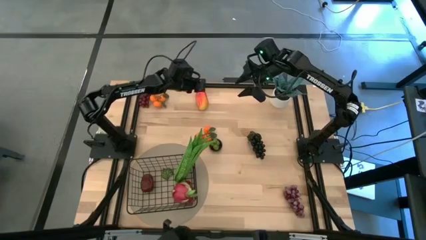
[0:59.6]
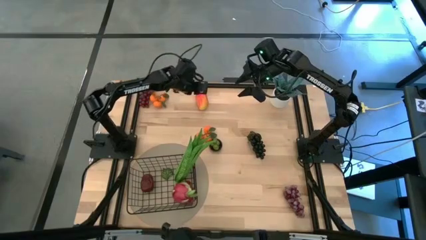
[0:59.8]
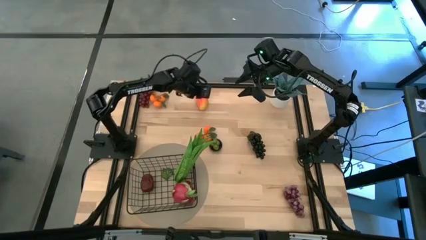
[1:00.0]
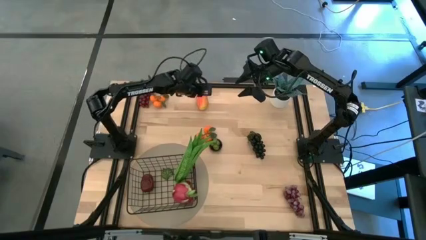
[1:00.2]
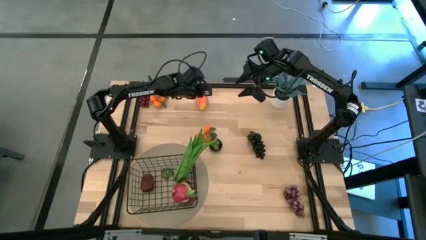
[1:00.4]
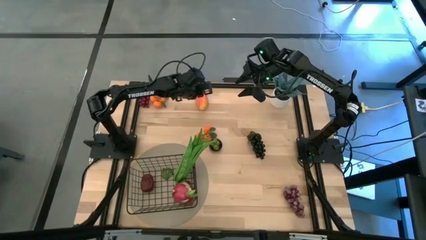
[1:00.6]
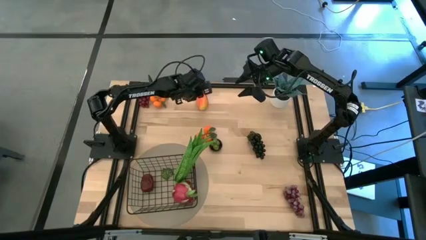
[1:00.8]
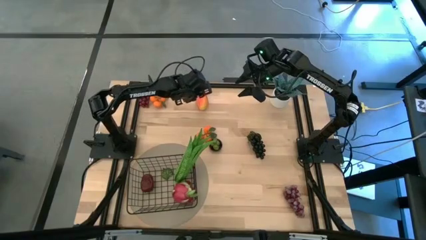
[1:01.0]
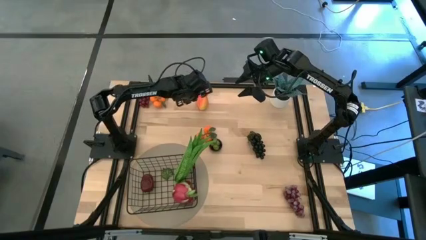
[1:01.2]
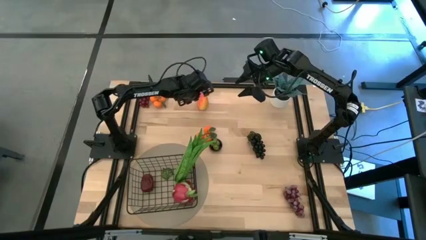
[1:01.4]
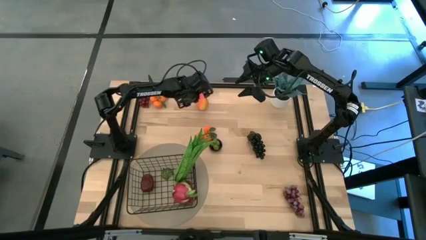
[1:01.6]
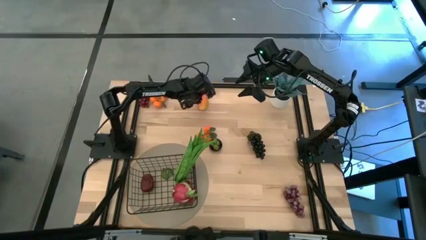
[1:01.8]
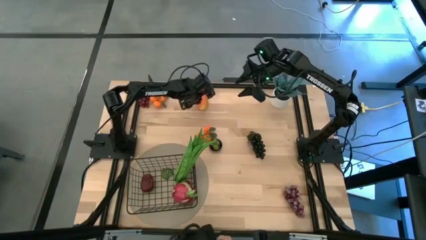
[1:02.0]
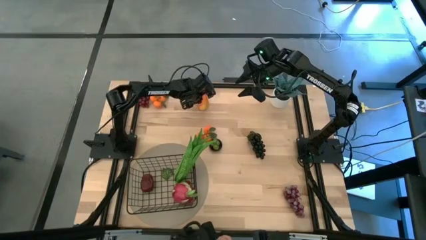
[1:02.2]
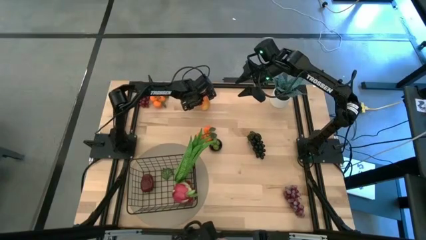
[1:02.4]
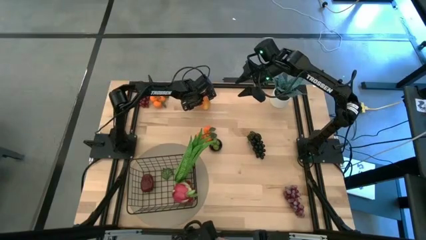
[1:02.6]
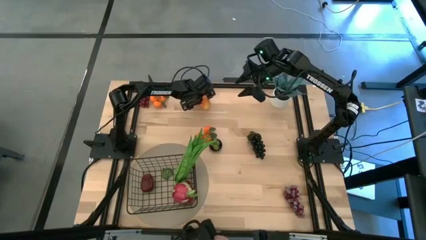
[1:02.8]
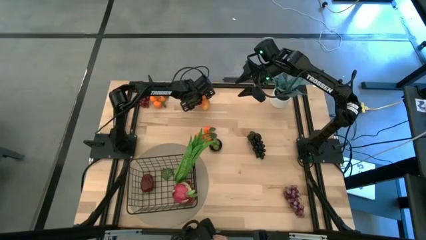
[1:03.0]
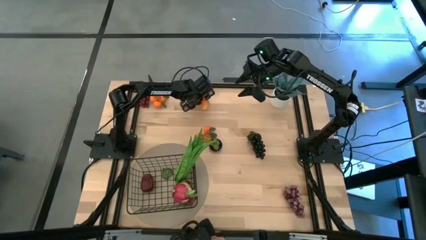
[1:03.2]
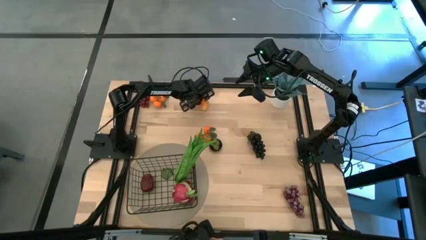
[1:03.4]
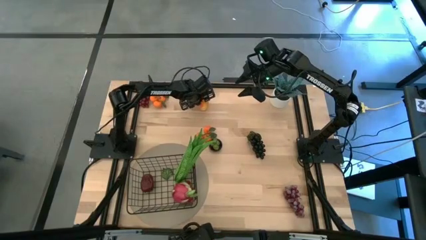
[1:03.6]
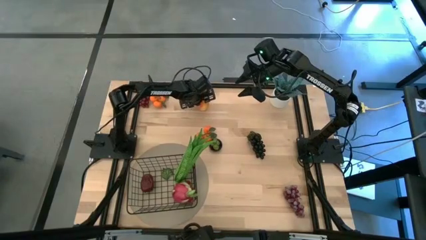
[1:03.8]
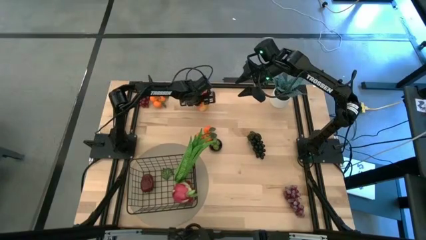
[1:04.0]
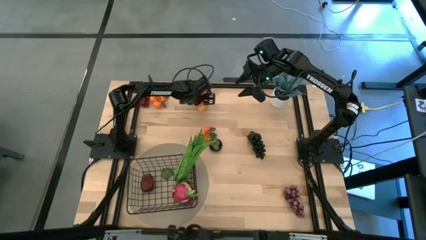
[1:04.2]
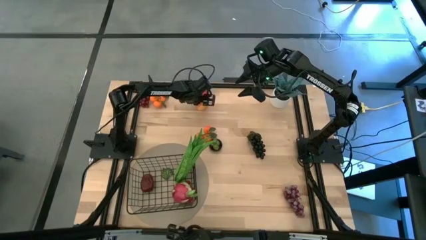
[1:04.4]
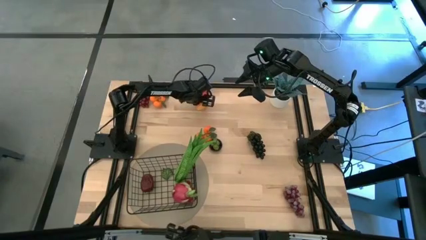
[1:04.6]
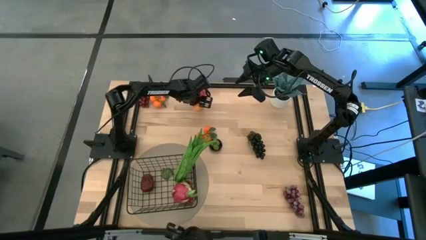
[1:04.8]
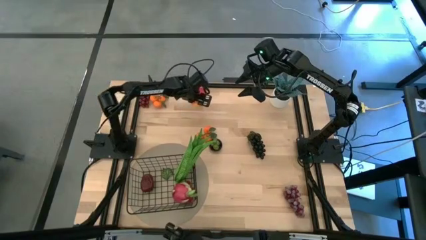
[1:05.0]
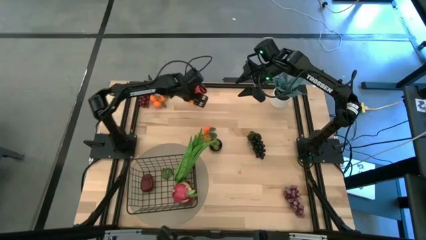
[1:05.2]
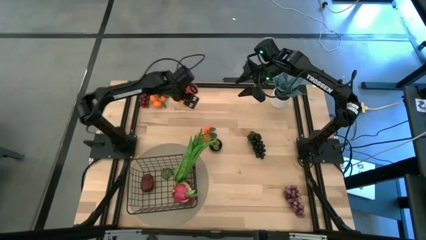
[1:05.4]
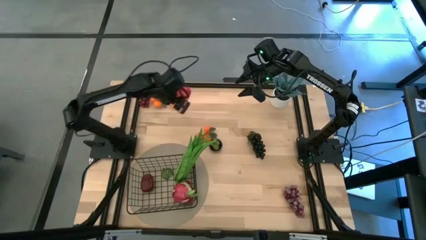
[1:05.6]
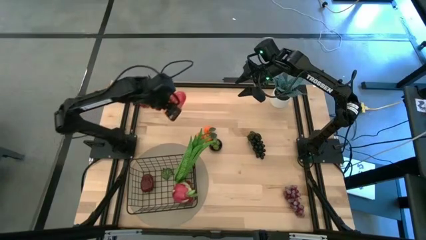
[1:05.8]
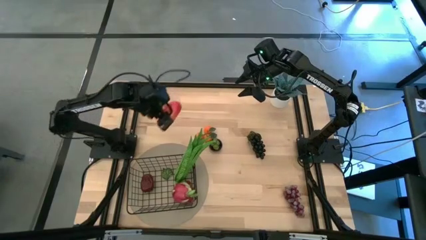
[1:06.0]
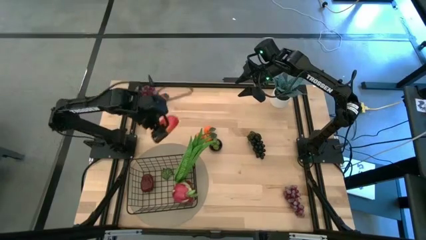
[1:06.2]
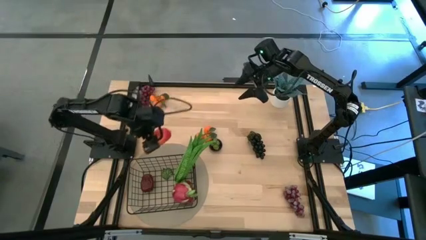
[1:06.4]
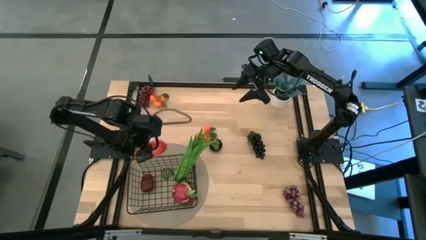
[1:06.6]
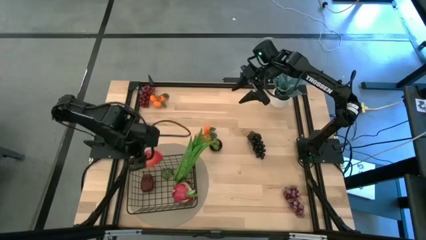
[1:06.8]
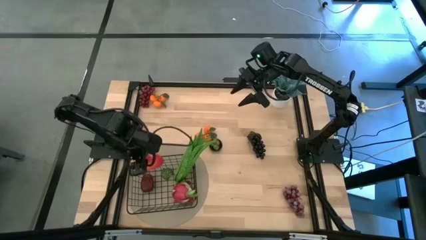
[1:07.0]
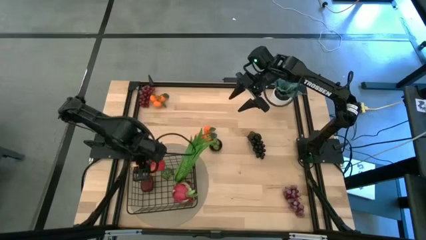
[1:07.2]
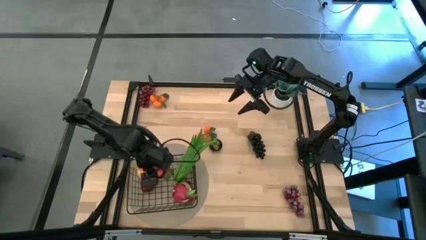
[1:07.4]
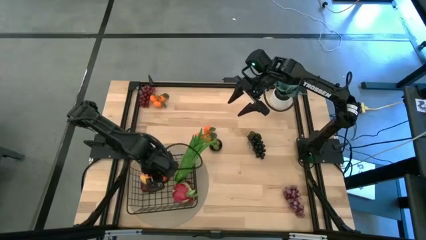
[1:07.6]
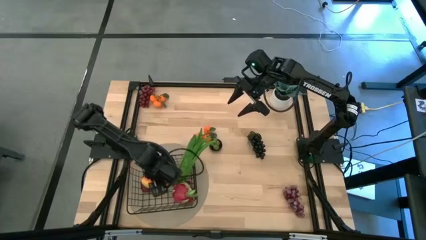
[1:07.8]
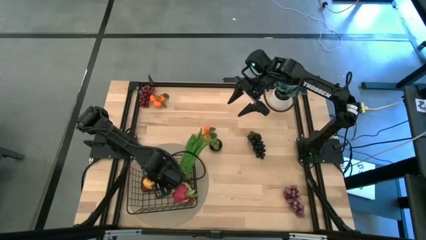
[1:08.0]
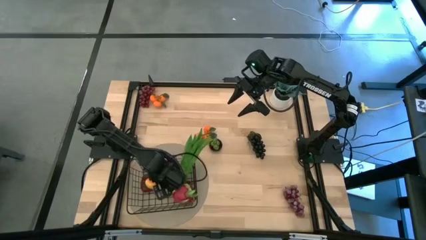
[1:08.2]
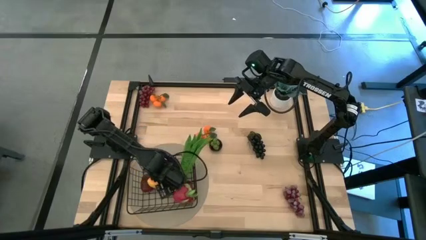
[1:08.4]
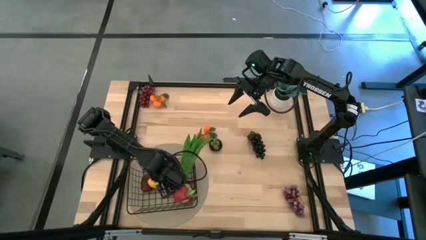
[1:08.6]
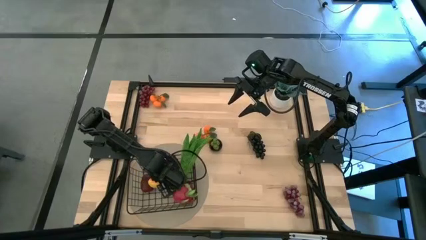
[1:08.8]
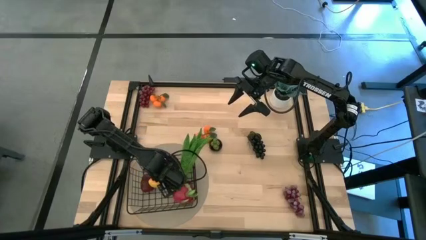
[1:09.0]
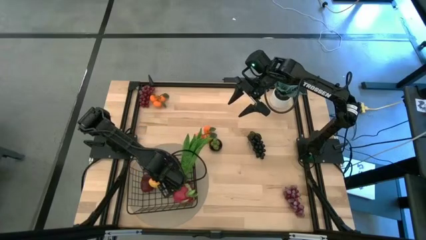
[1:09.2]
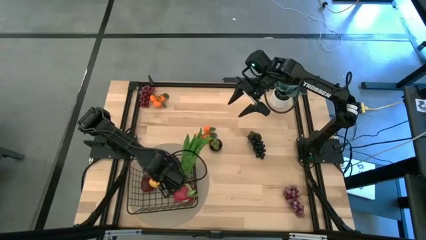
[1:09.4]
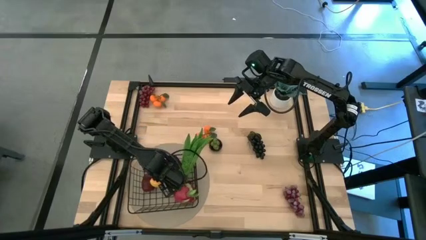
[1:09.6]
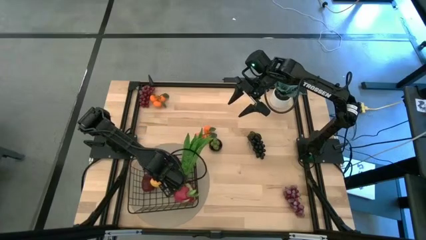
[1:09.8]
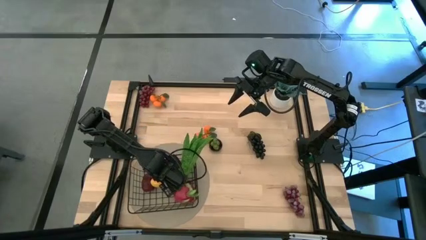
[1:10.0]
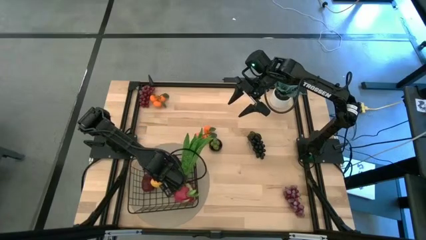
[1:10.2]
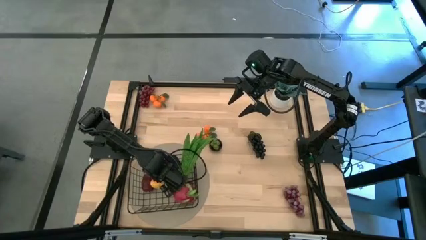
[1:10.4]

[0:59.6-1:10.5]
Task: Build produce basket
Put the orange mango into the black wire basket

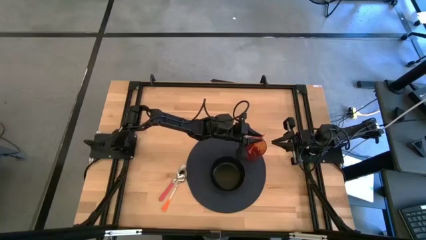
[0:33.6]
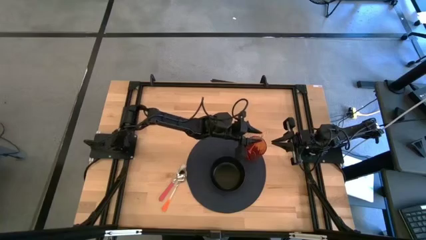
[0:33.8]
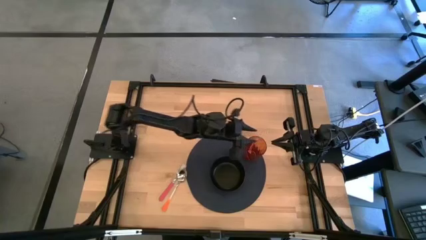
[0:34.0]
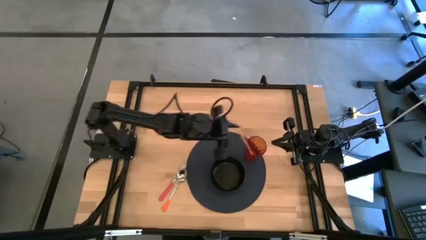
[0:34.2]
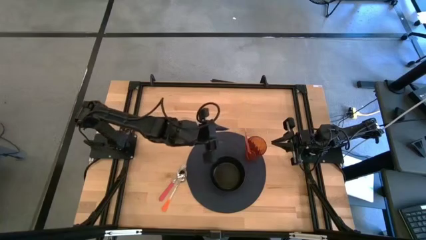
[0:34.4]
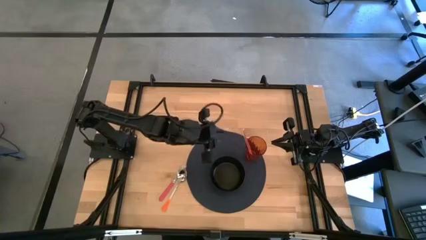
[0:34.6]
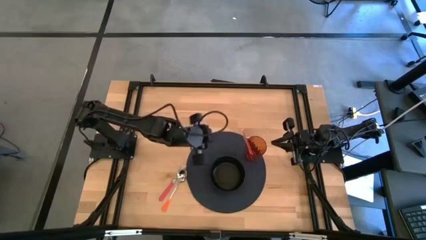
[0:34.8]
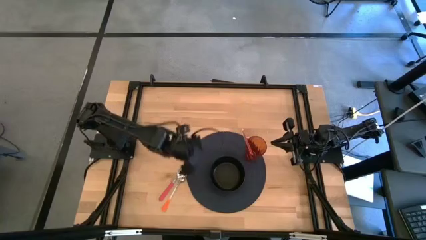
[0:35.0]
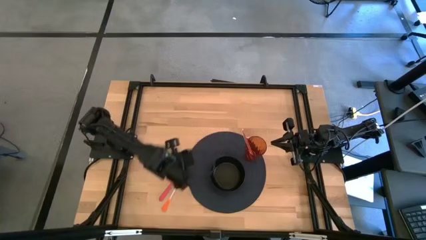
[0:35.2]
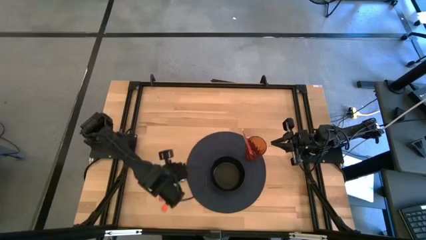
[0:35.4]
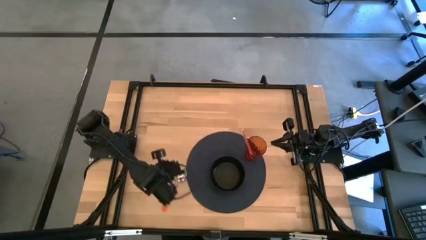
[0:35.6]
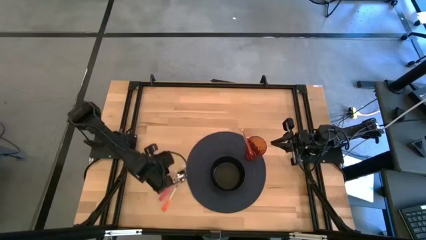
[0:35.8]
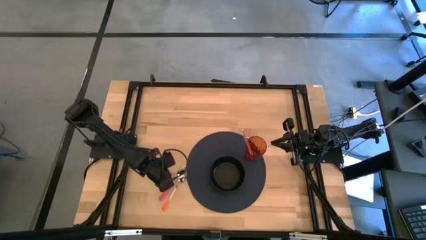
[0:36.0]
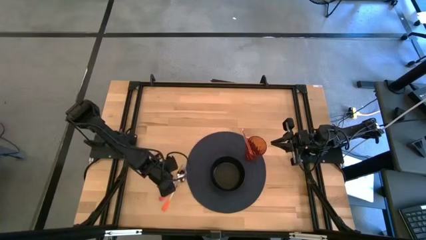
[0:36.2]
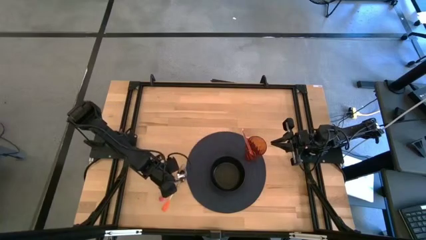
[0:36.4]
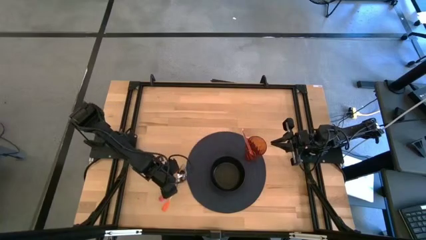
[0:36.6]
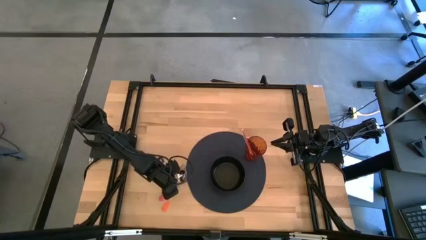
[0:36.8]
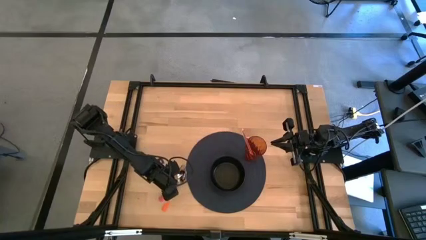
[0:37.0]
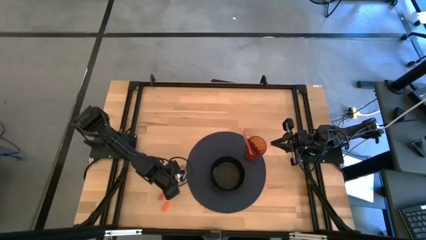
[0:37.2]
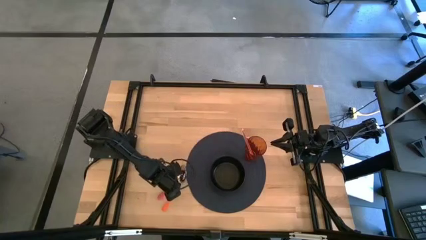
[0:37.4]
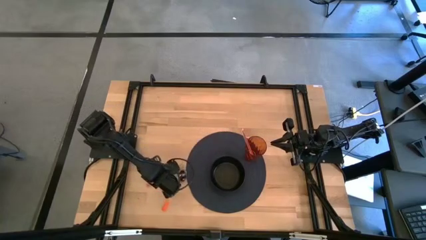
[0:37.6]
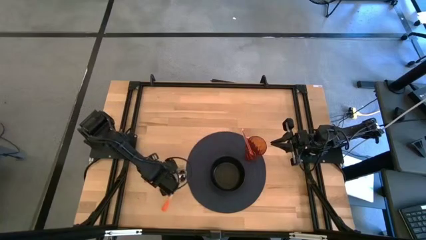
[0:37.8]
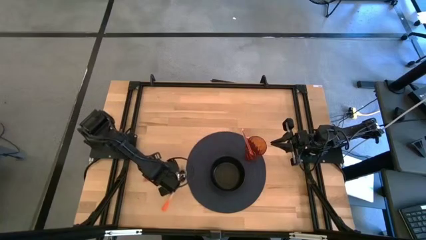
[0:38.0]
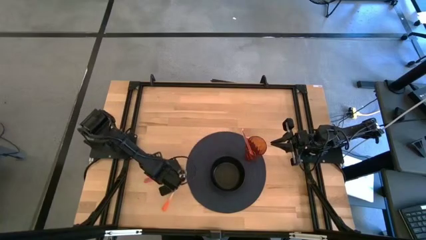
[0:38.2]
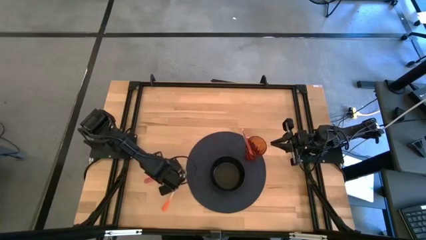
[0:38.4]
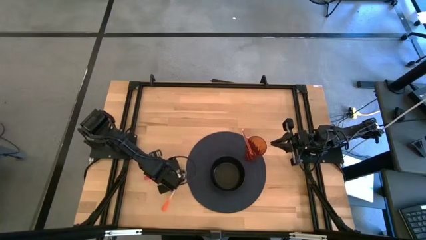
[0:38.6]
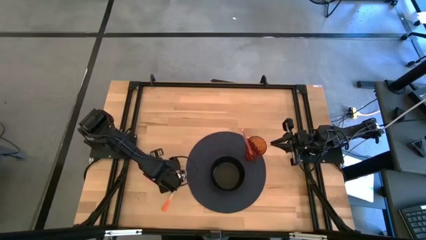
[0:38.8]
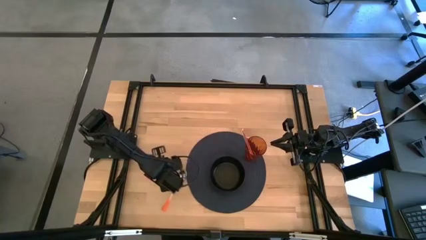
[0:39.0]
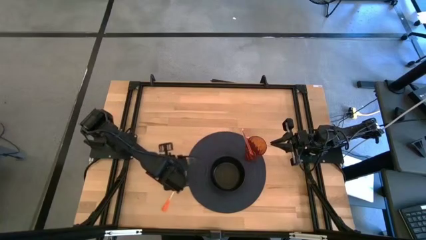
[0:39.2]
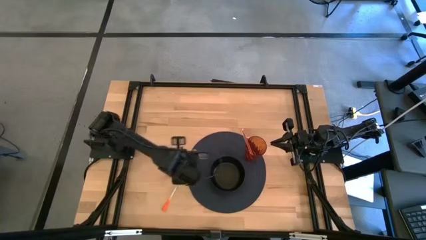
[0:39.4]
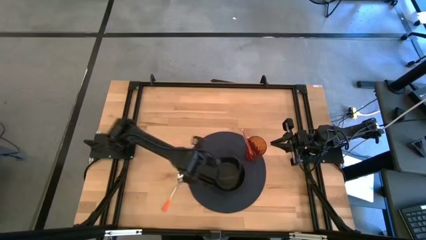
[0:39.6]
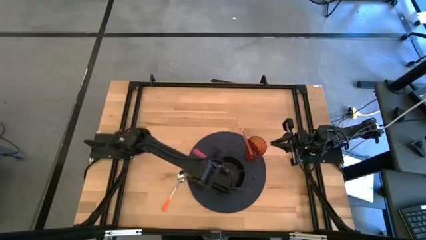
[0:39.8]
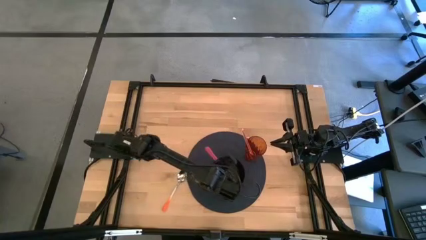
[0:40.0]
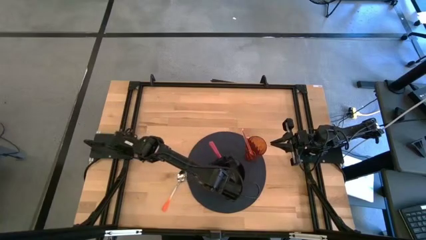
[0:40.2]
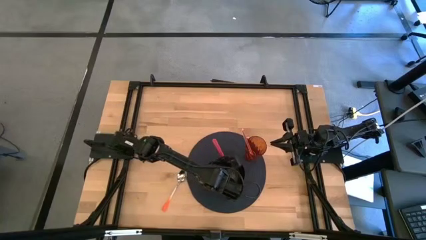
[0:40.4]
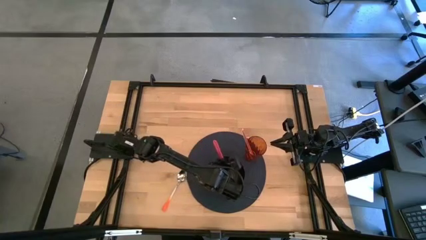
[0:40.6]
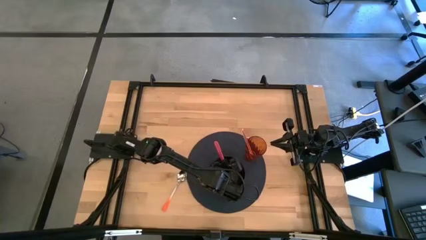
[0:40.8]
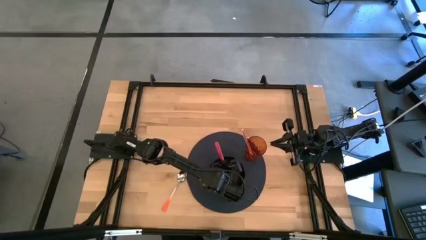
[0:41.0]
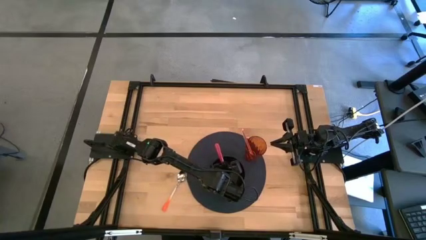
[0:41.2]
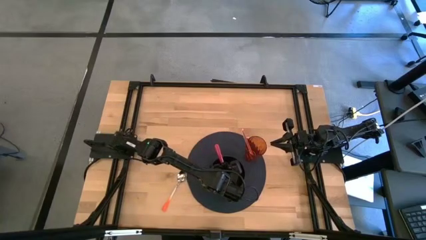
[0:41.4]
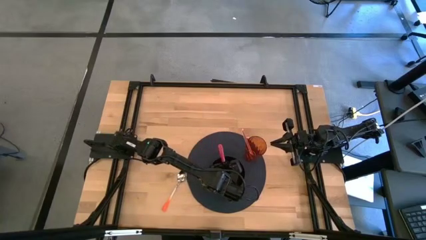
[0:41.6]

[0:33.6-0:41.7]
Task: Pick & Place Utensil
Put the pink fork into the black bowl on the black mat
